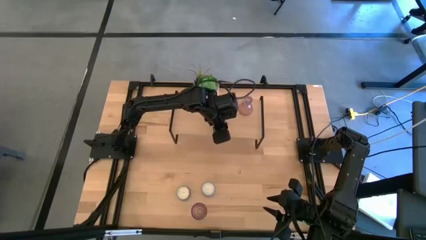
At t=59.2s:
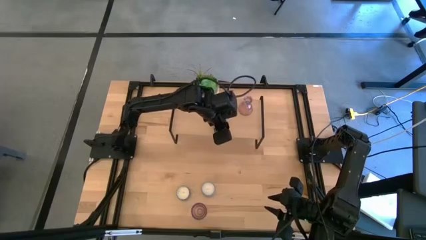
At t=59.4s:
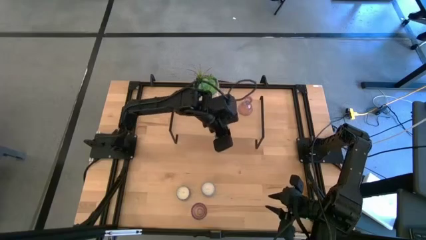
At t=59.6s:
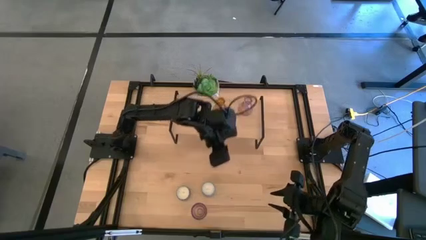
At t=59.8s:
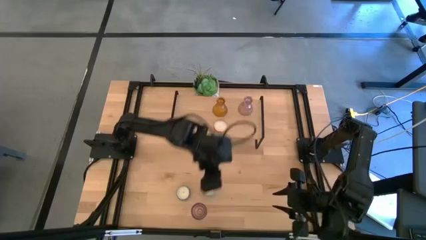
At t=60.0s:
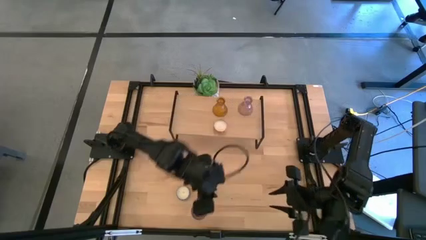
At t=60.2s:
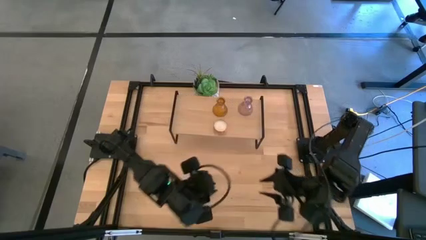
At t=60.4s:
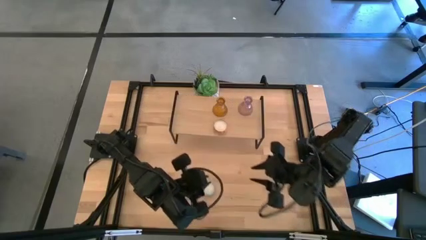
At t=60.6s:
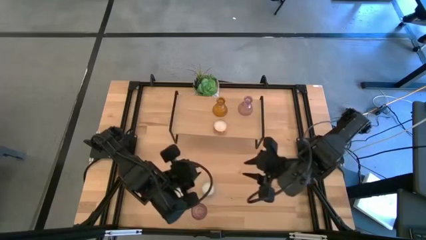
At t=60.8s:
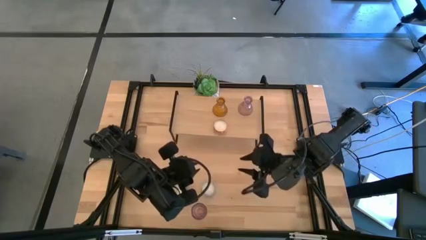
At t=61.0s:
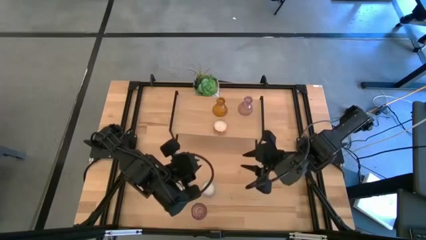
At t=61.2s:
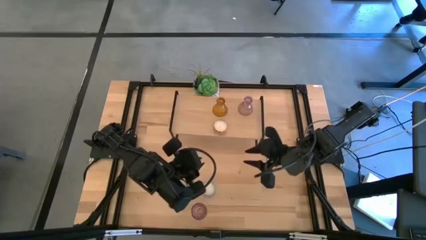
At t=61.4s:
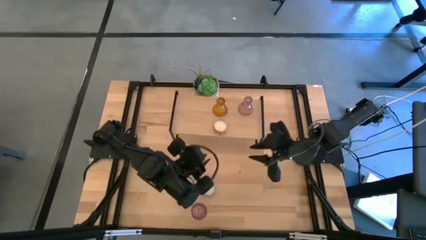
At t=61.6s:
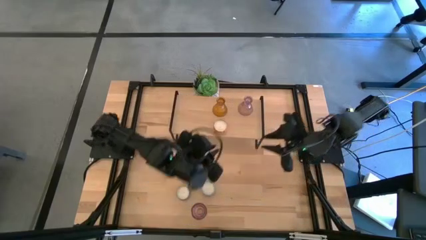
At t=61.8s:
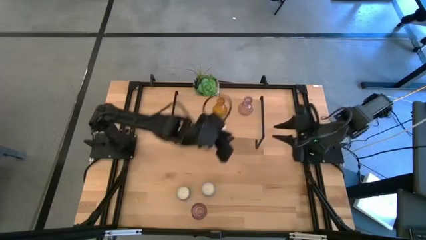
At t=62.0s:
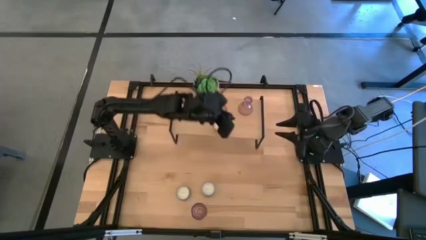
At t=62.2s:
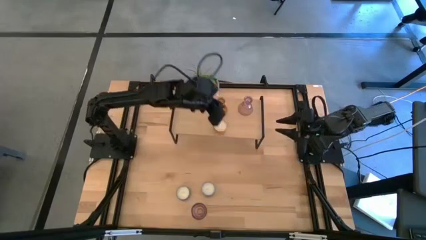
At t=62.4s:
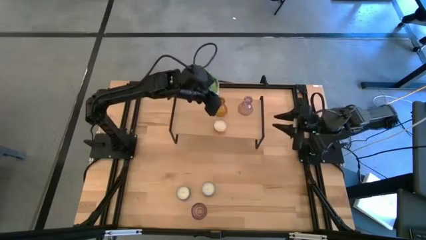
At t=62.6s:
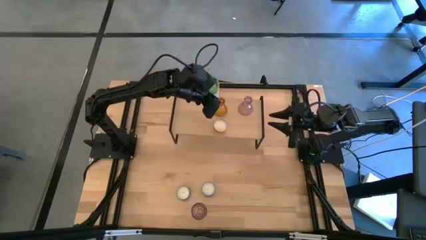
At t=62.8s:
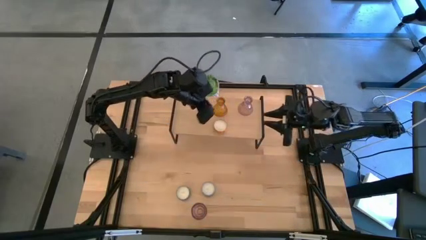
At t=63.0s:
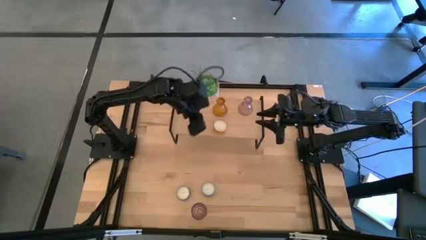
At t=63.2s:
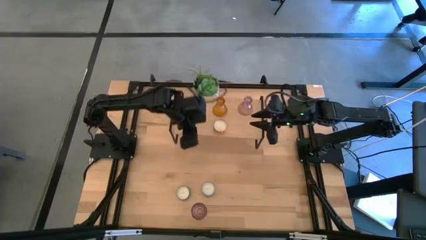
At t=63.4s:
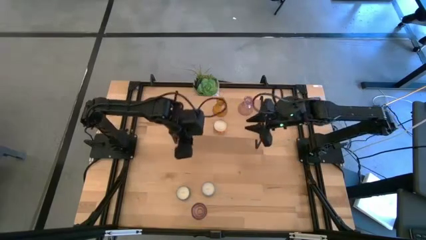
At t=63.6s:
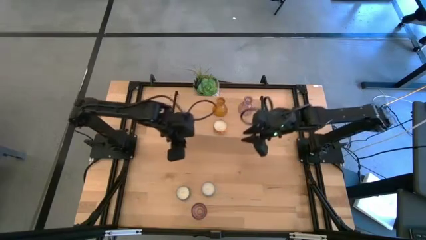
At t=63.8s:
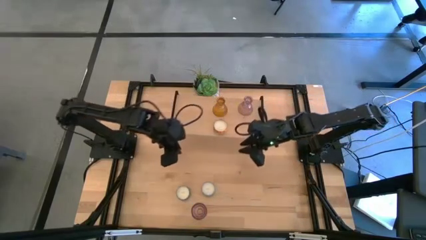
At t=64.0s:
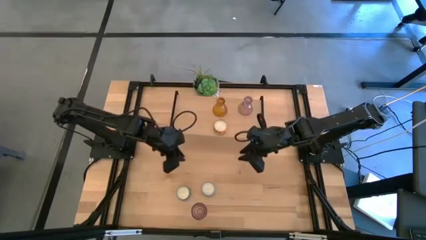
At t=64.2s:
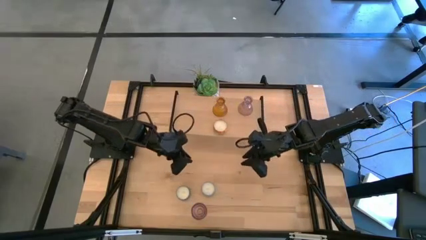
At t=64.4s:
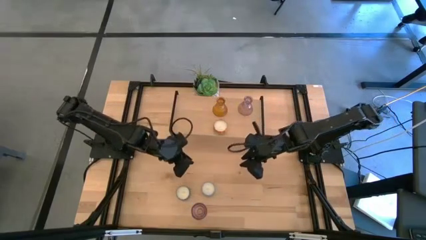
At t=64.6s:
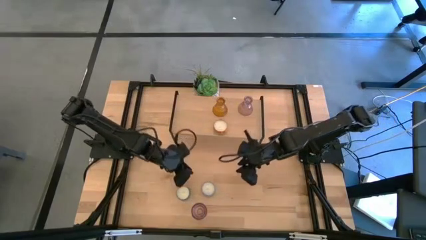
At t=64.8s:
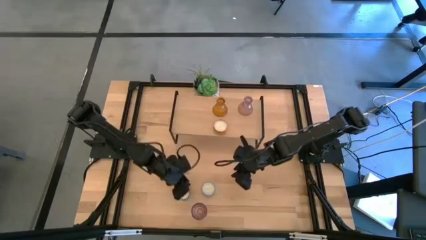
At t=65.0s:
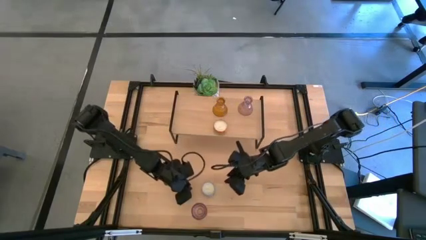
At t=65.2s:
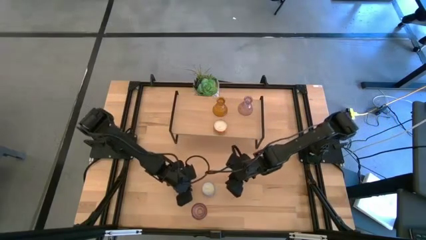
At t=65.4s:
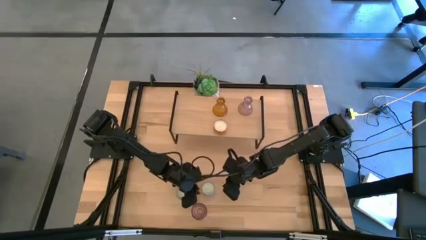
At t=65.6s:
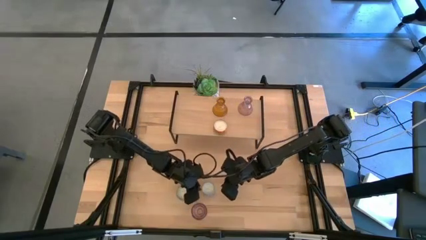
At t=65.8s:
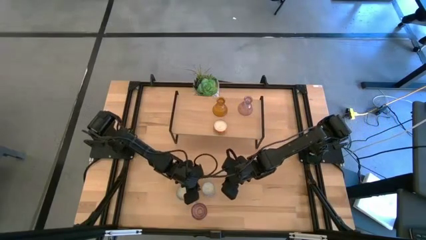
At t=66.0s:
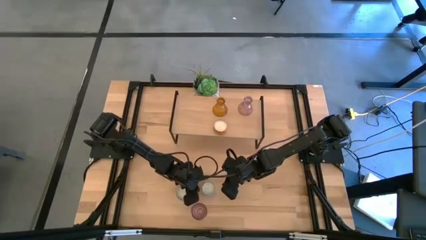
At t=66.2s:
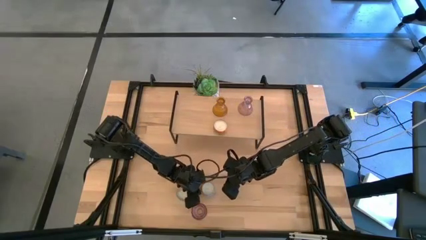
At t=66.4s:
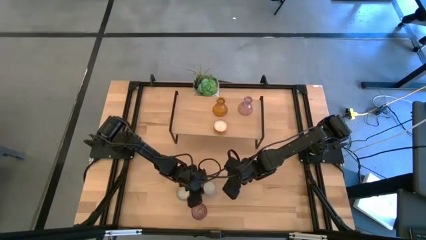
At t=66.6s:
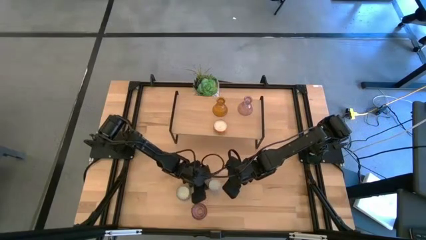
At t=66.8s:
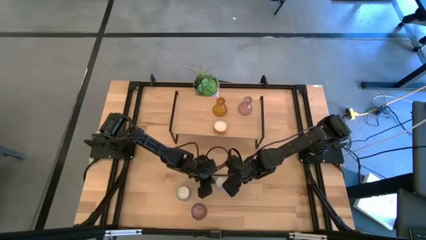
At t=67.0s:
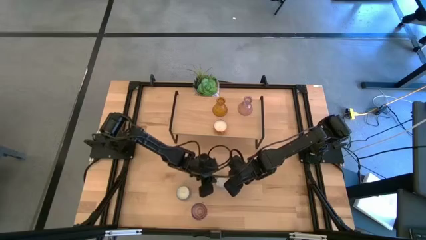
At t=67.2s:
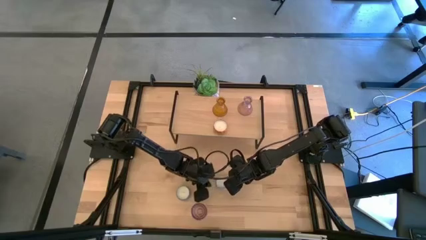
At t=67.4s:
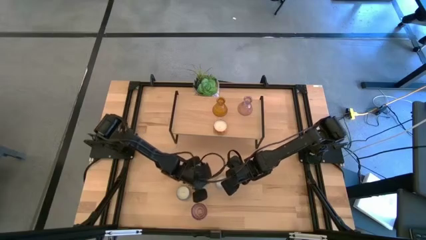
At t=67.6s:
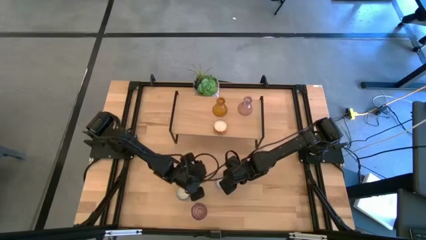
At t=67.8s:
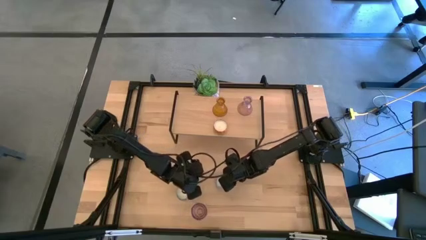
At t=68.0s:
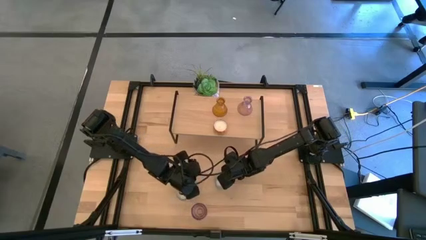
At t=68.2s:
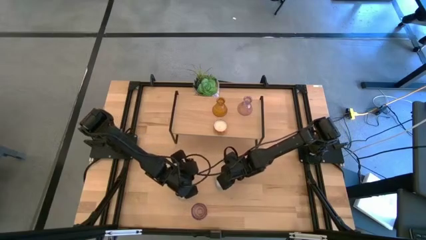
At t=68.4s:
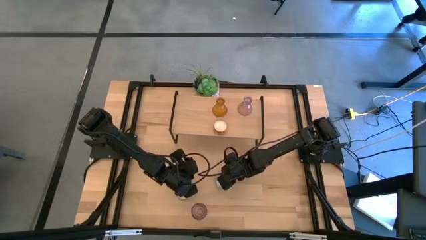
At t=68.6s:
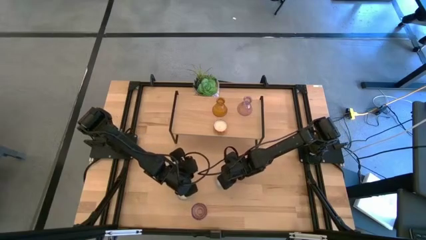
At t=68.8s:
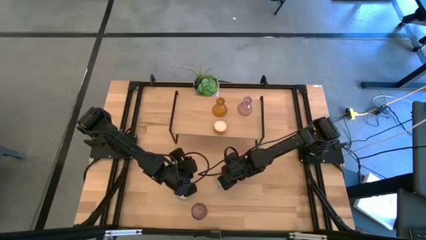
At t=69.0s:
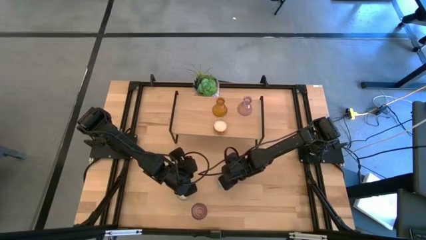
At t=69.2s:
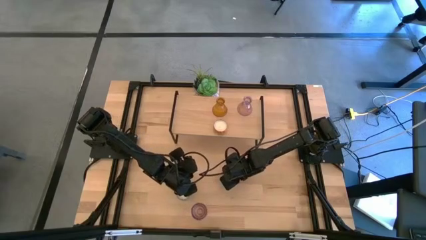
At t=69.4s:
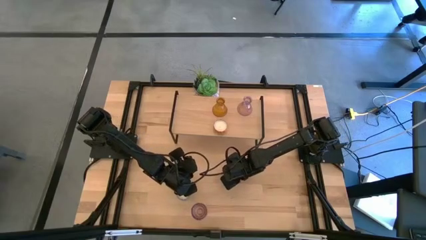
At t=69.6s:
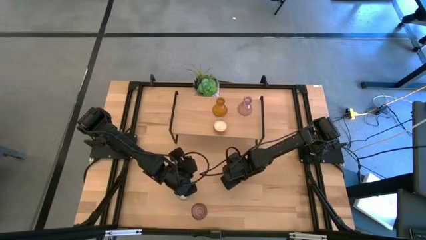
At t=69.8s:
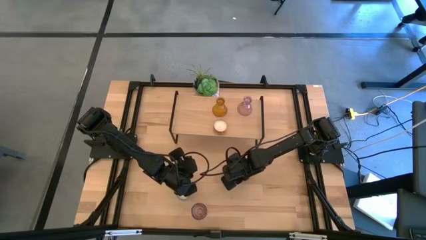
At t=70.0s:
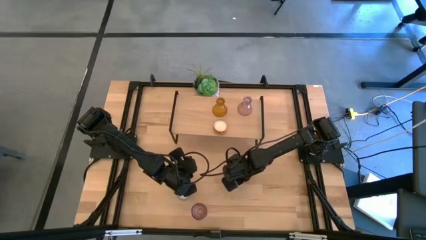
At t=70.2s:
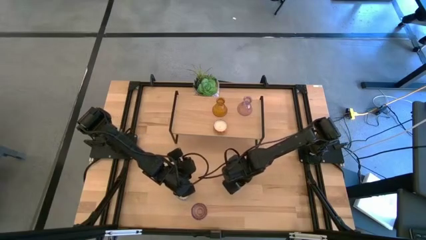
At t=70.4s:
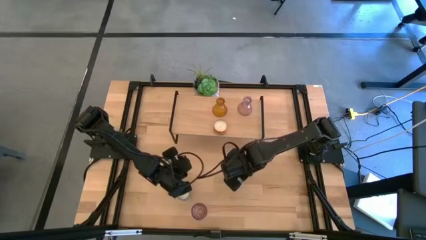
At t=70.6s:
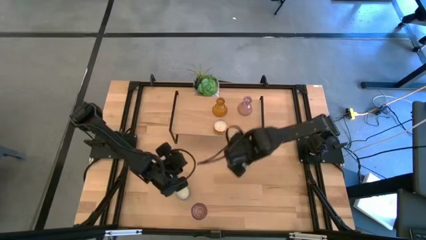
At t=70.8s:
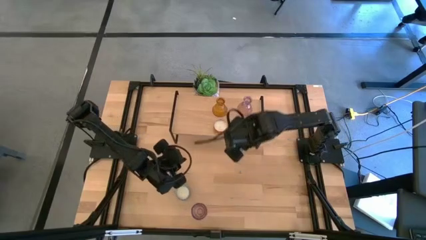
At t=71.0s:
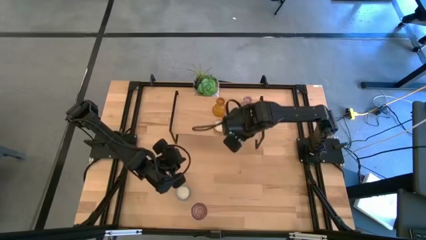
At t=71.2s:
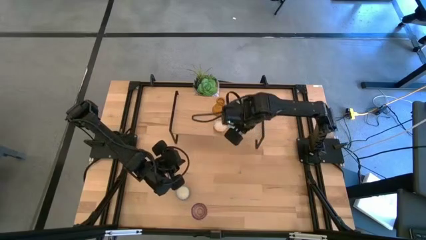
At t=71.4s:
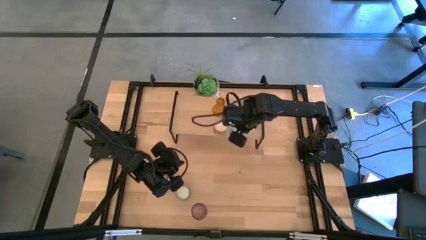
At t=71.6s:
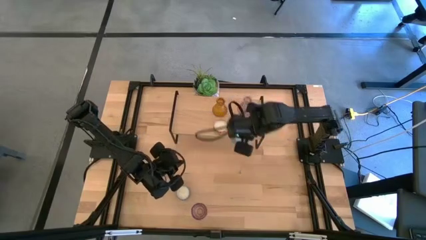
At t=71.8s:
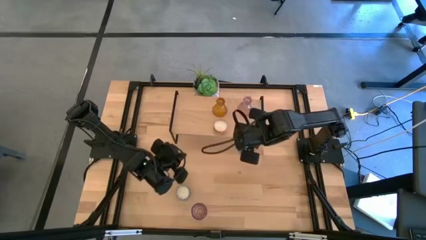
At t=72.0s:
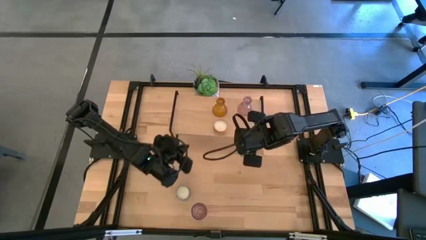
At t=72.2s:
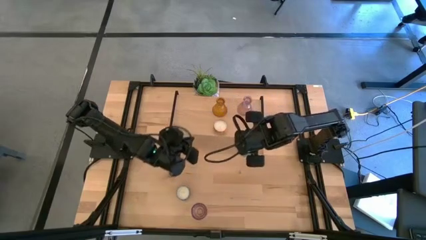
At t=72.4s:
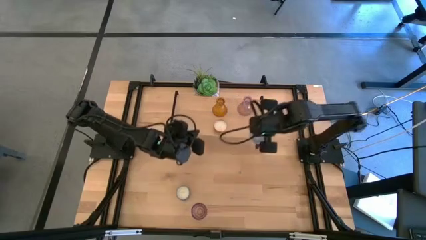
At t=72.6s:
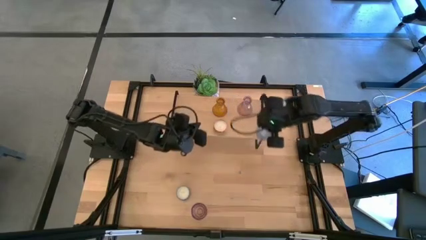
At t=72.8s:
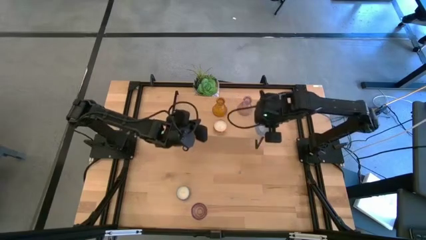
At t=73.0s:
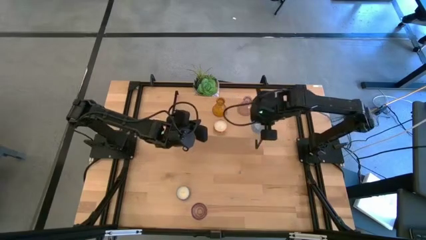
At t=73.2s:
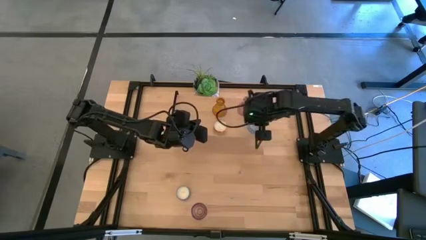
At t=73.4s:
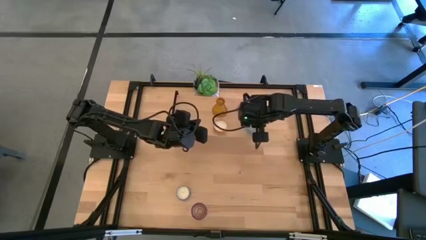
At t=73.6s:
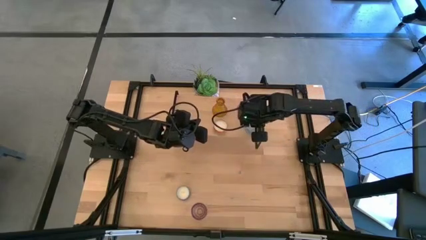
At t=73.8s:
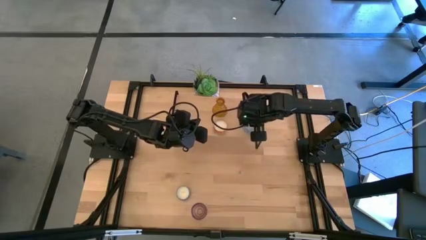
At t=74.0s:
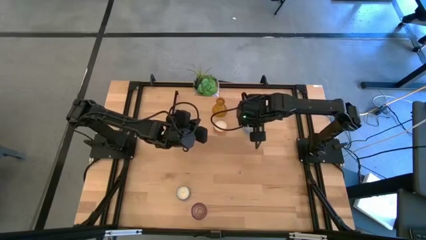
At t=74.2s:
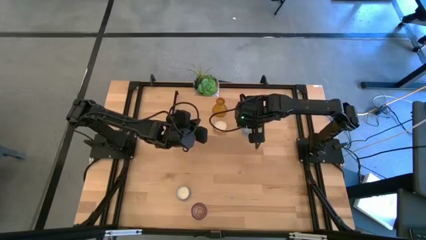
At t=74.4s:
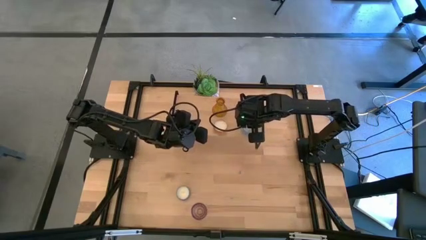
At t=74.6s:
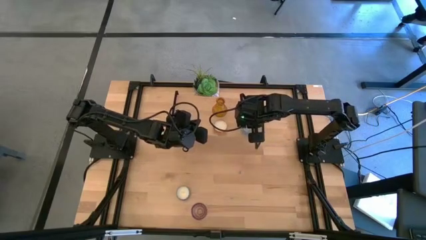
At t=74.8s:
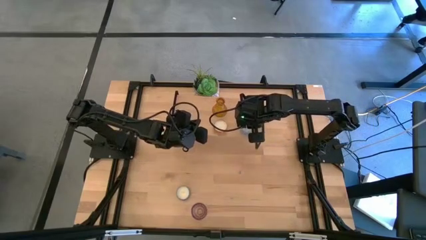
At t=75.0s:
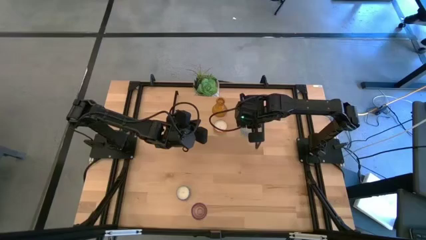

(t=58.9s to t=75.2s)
Task: Pick & Place candle stick holders
Put the right blue candle on the shelf aligned with the violet candle holder
